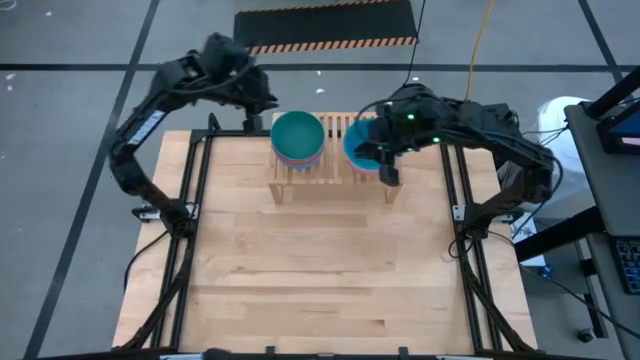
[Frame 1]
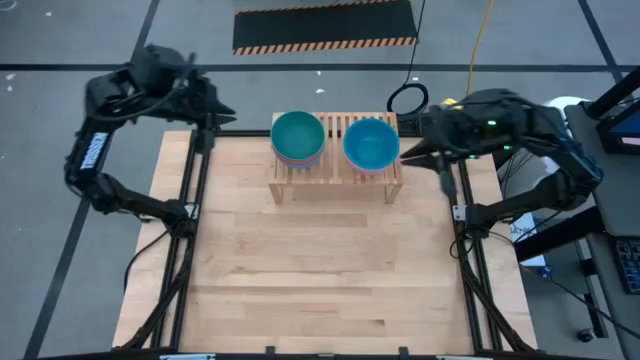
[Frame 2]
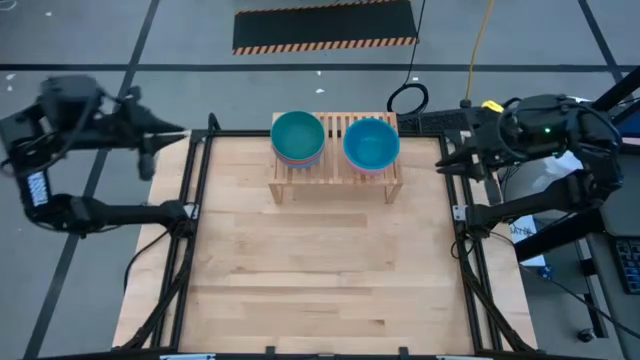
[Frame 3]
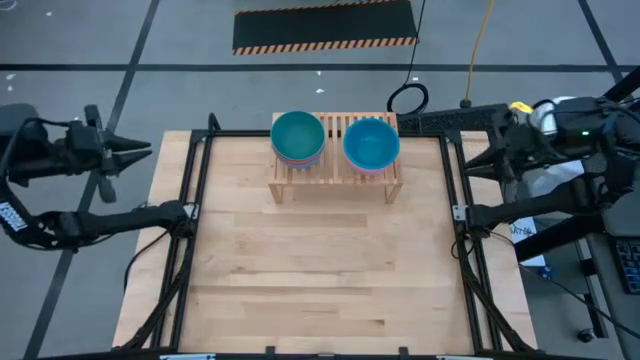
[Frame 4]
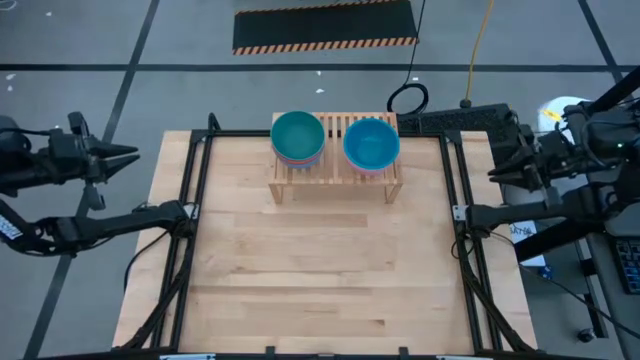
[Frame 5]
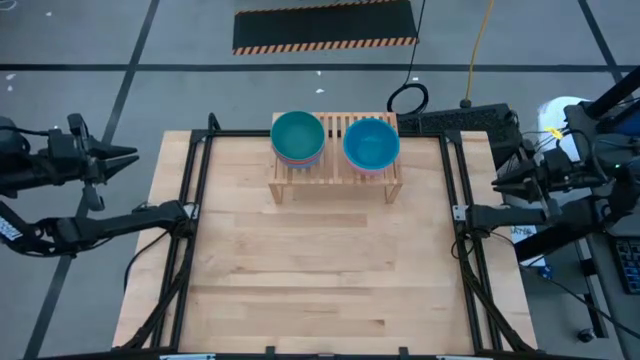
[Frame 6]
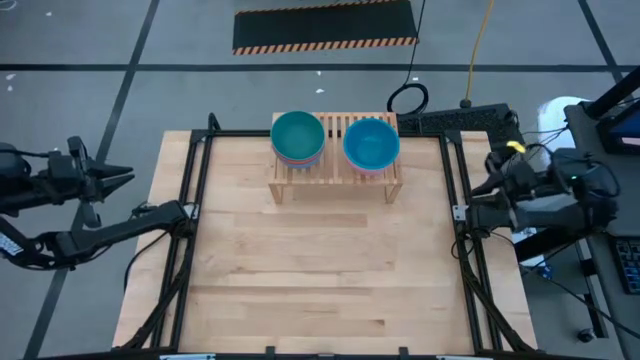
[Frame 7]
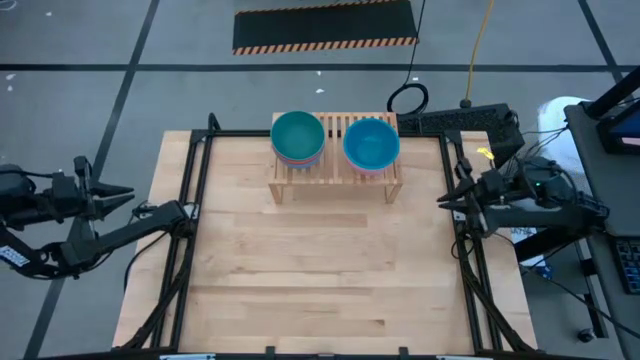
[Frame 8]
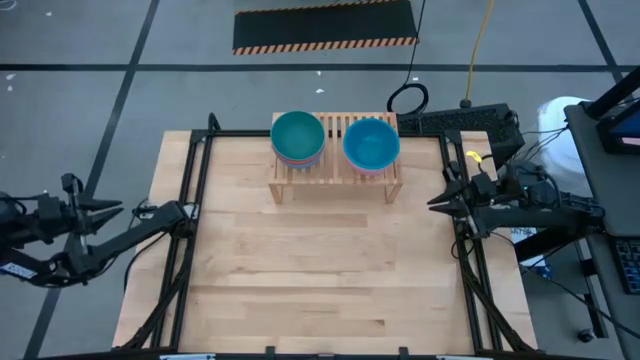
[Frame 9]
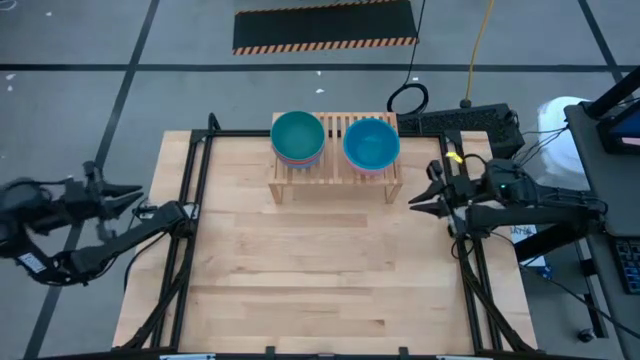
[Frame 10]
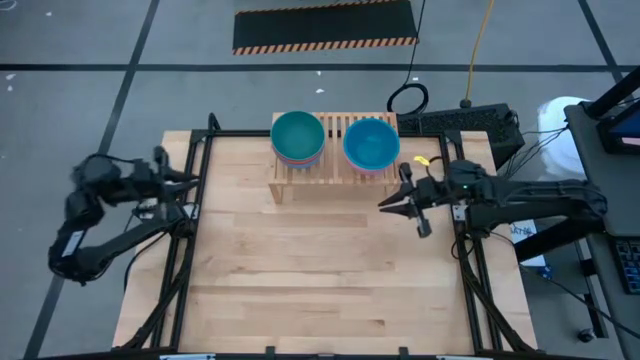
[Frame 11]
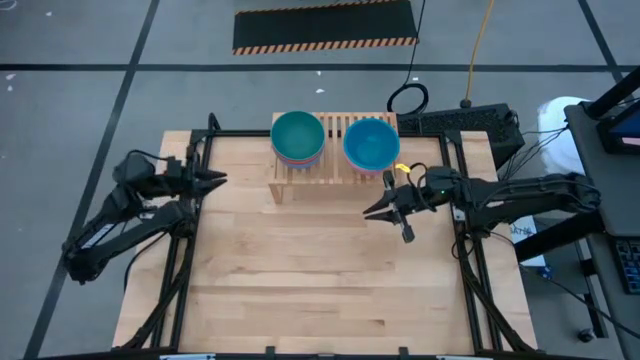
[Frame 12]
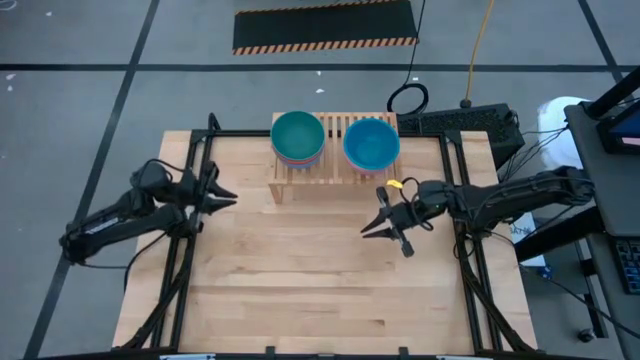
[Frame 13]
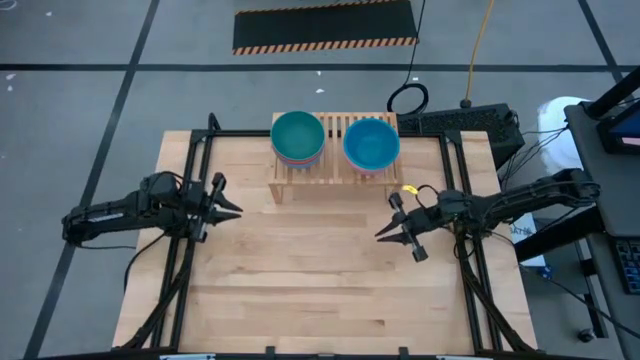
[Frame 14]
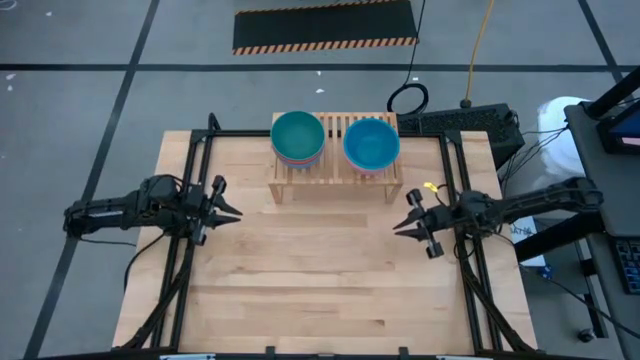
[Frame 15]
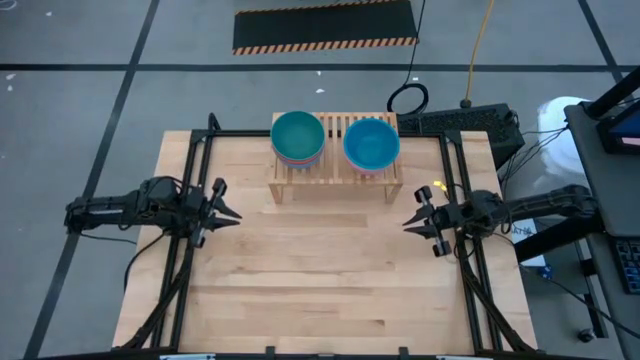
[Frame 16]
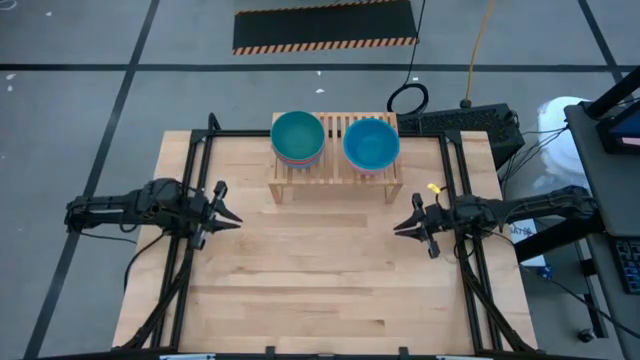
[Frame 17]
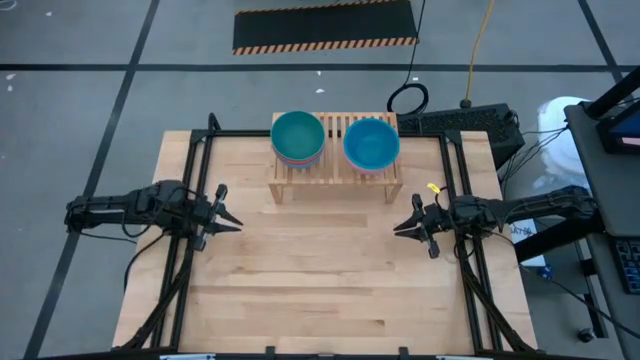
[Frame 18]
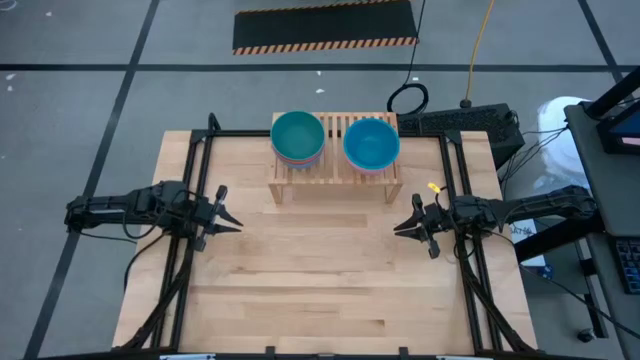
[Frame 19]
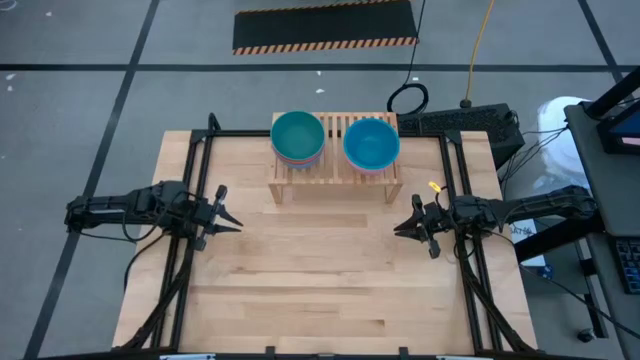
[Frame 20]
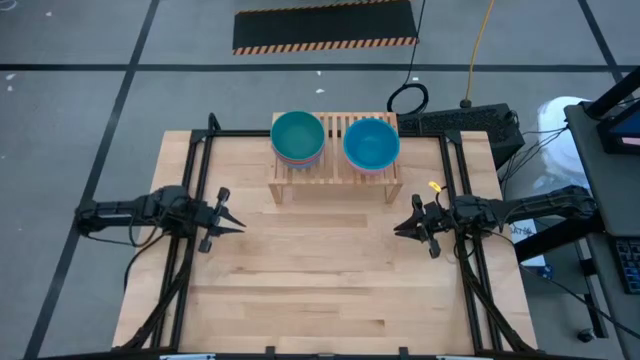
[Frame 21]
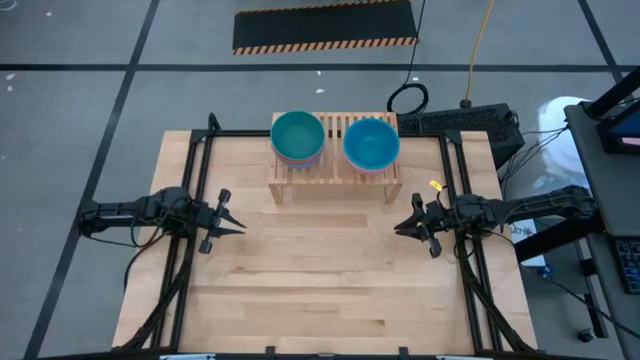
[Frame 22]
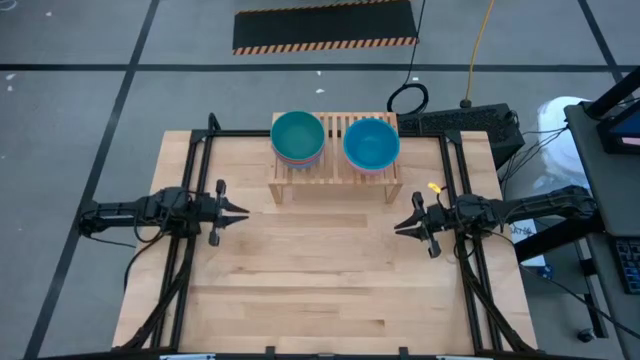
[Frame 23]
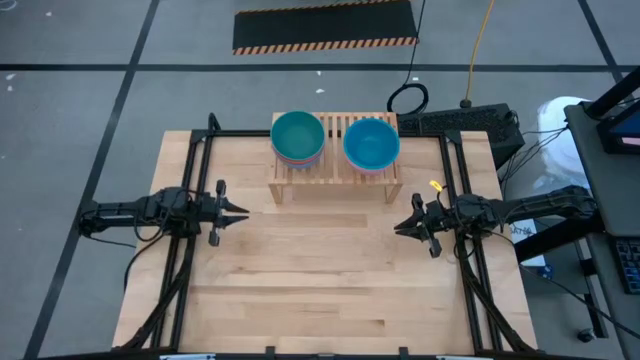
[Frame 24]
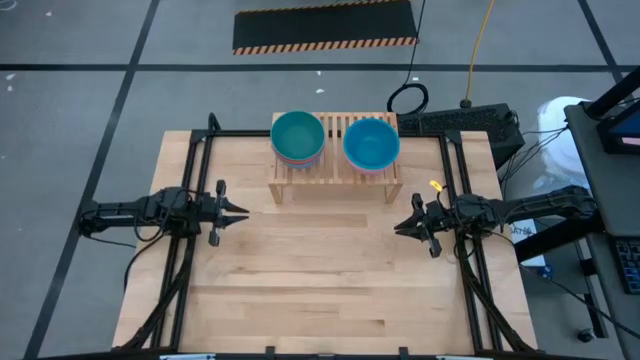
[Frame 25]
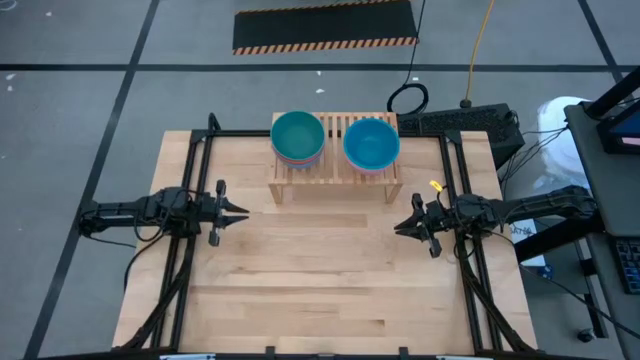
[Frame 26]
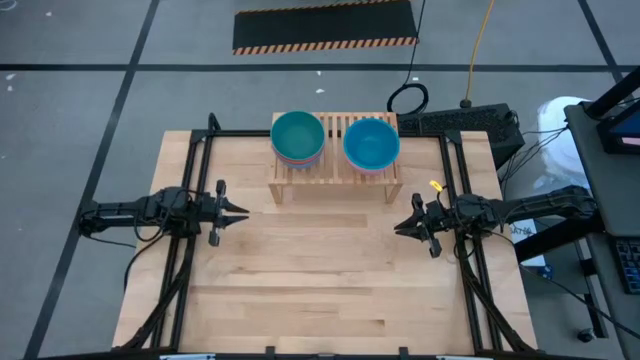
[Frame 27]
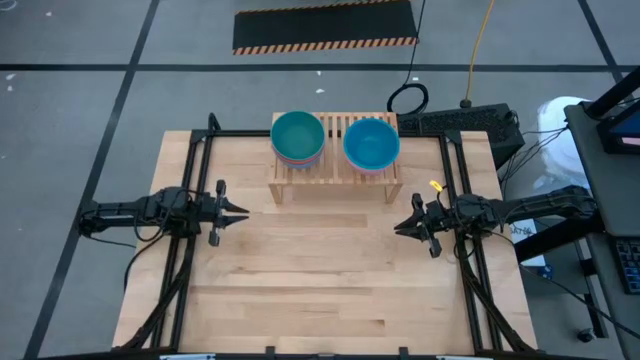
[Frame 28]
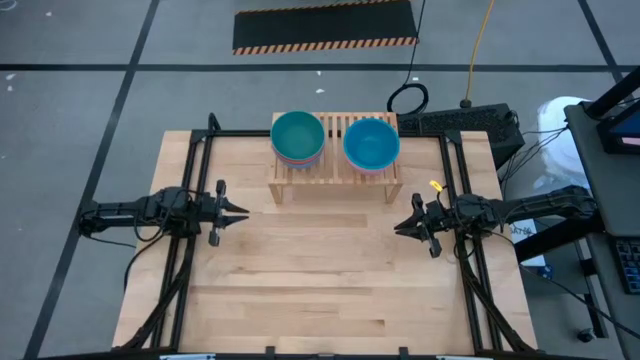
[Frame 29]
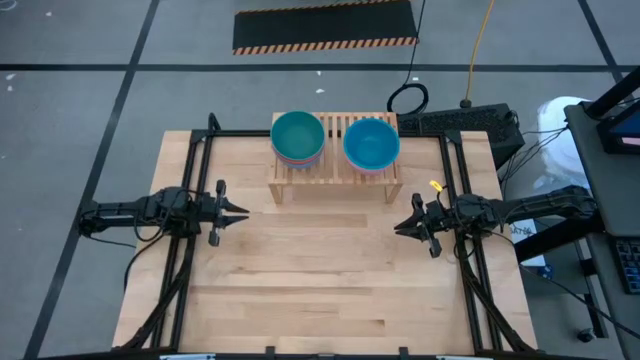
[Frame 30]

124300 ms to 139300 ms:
Task: Place and stack bowls onto a shelf
Return to Home Position
